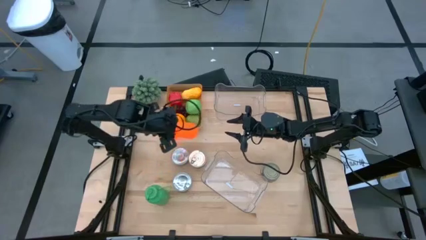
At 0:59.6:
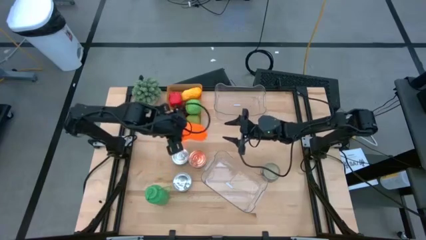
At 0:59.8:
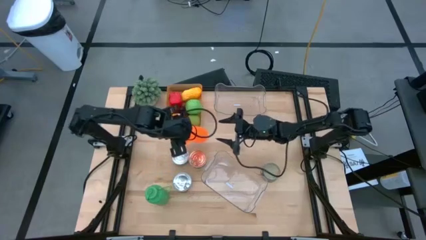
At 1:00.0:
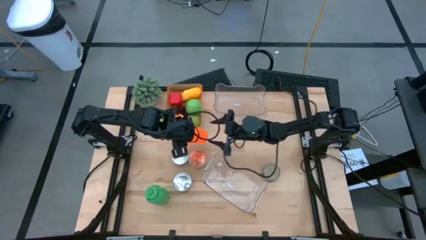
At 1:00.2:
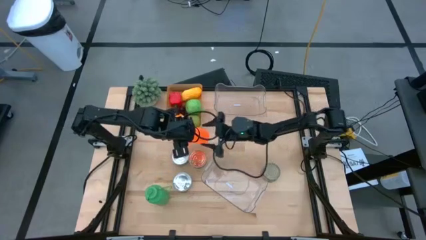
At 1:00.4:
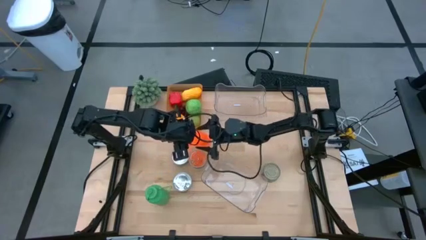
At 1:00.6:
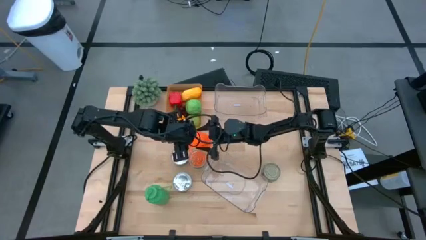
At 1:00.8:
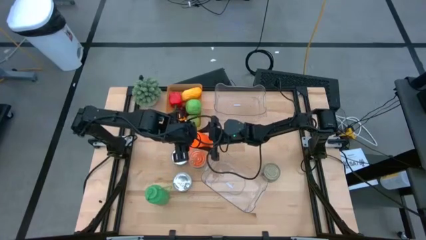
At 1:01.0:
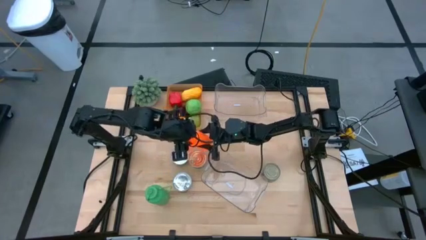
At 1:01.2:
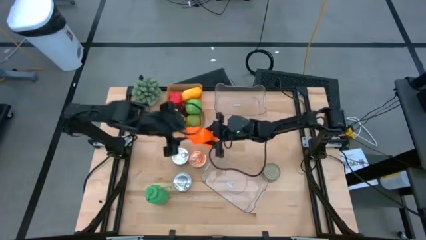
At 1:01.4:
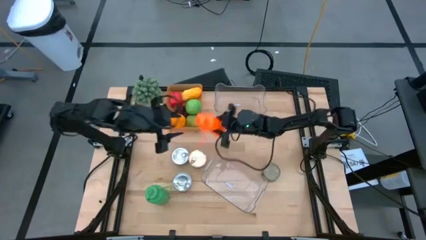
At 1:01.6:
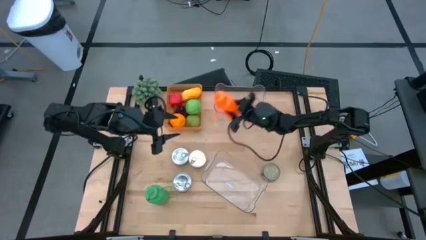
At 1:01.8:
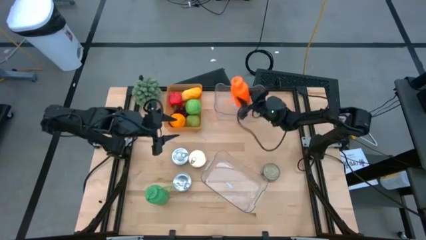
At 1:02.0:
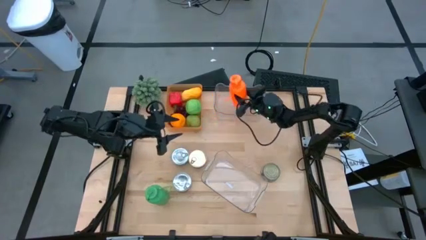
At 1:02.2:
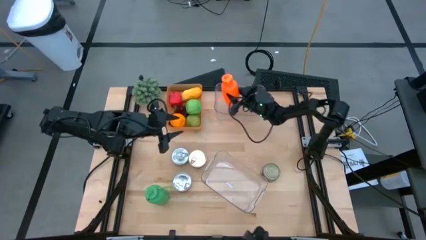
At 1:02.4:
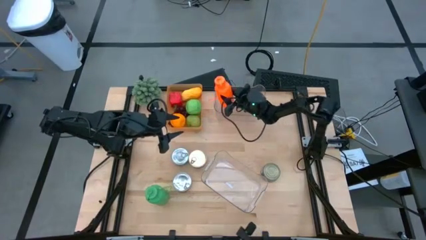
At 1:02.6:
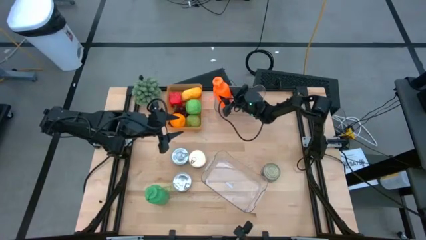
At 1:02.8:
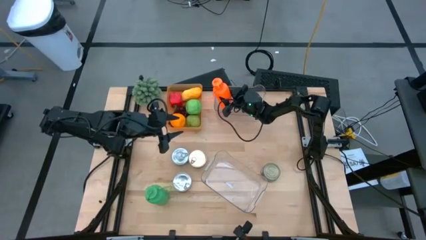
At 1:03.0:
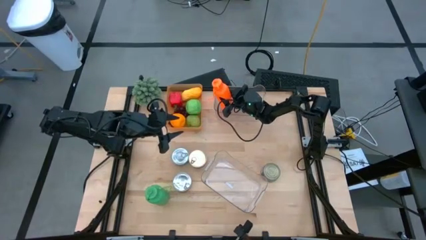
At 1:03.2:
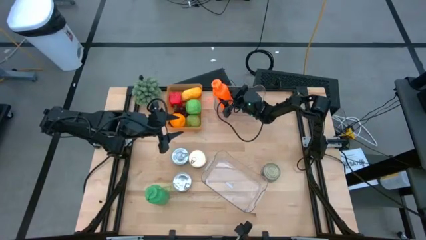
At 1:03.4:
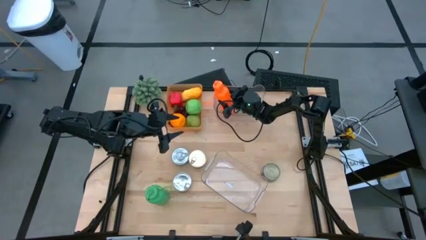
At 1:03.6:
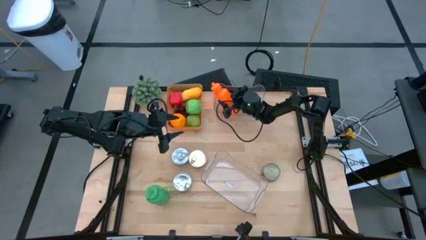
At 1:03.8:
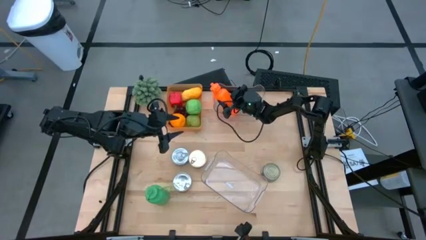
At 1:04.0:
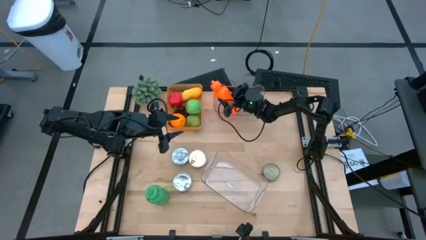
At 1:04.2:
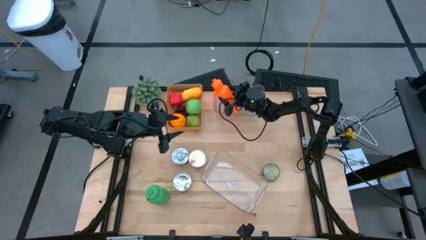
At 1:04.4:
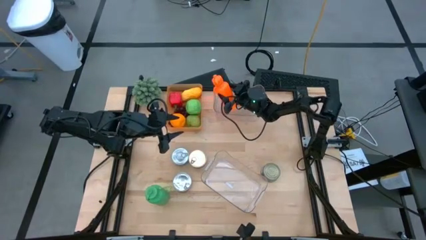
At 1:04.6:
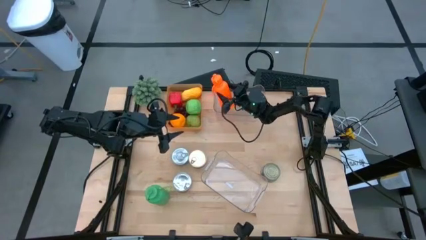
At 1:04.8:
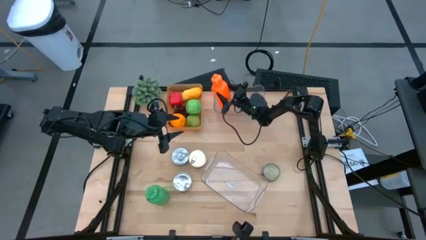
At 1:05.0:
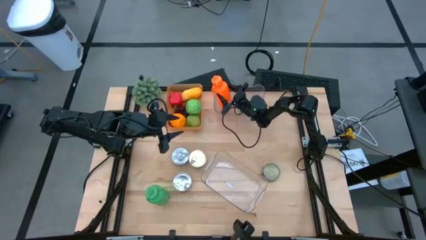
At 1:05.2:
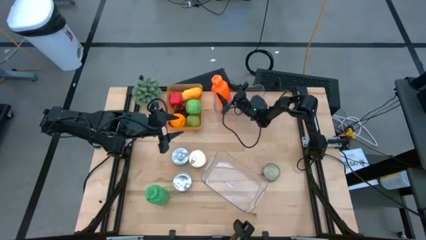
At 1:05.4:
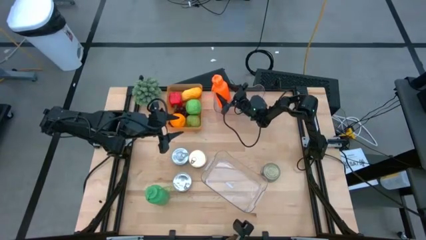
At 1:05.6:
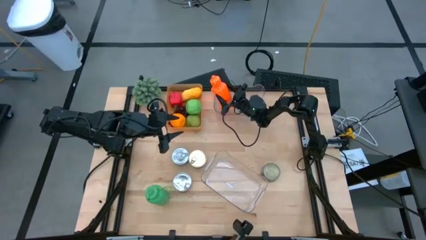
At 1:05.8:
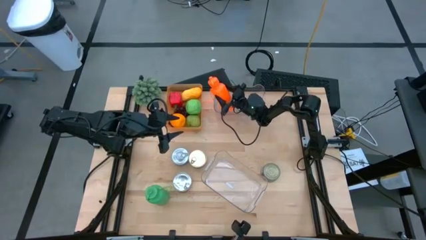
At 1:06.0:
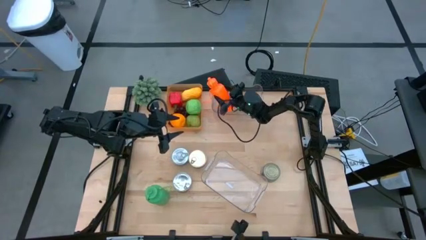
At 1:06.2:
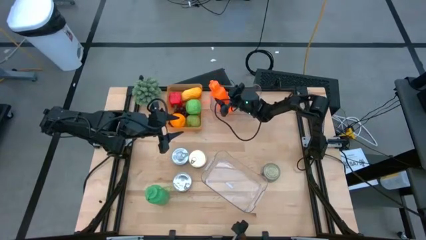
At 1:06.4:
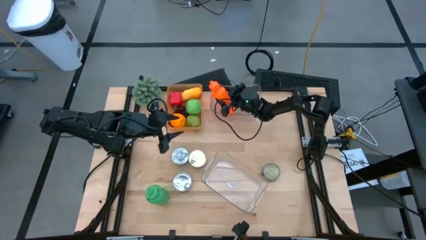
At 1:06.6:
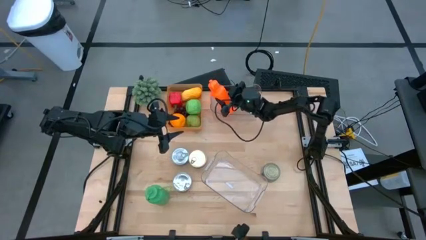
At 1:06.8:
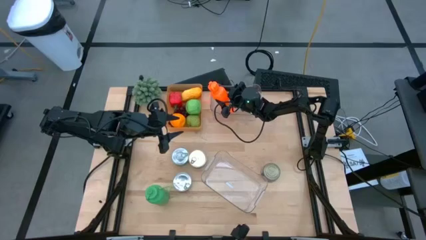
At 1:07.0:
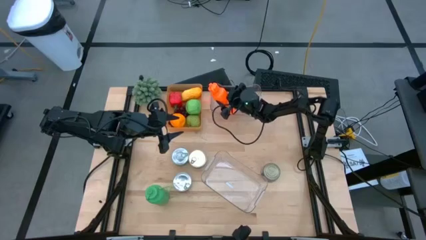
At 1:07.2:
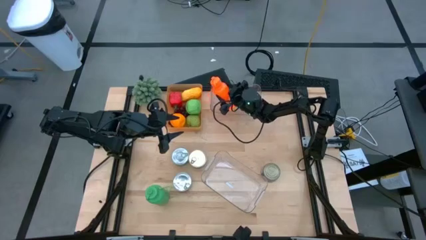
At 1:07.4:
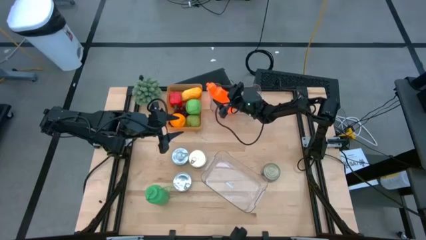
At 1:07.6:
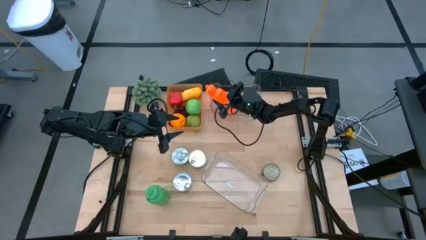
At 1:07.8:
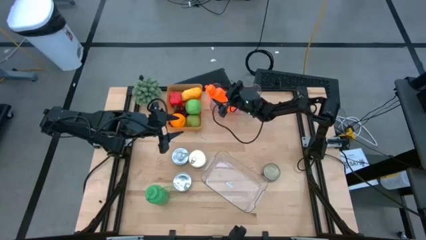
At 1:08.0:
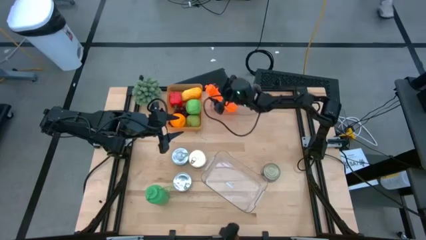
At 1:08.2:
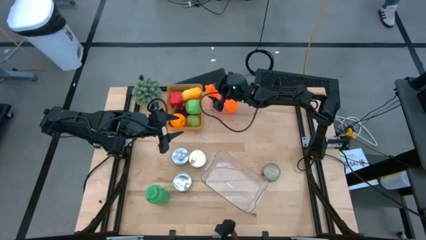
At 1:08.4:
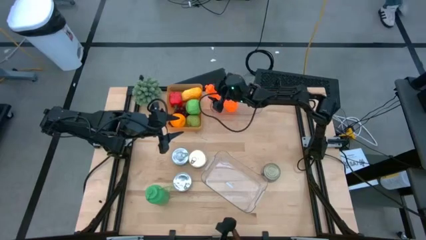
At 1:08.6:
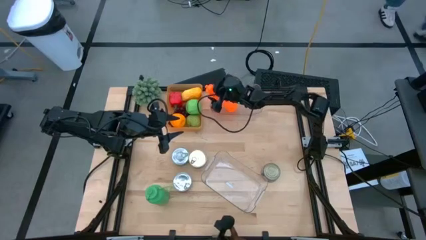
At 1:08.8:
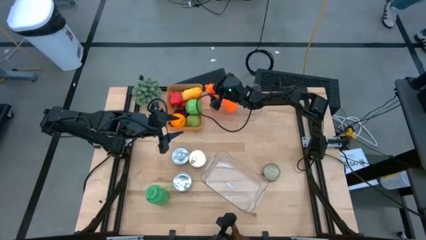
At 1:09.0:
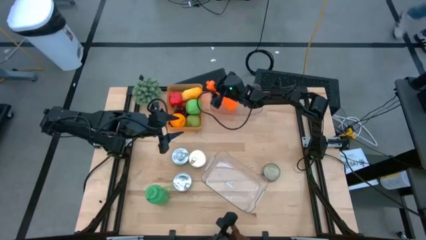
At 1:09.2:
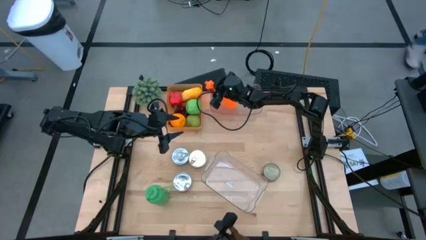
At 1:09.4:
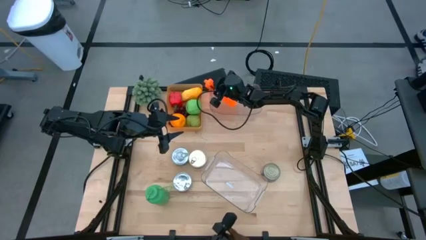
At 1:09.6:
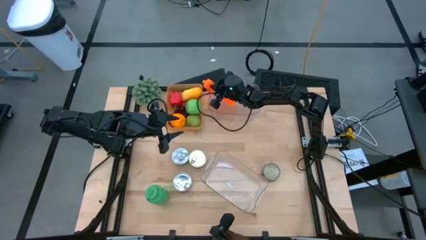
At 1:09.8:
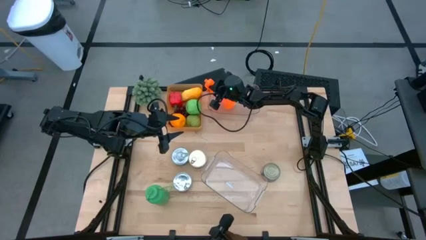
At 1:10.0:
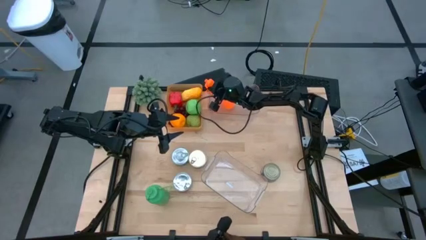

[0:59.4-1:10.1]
Task: Pick & Place Food Item
Put the orange water bottle into the top transparent bin

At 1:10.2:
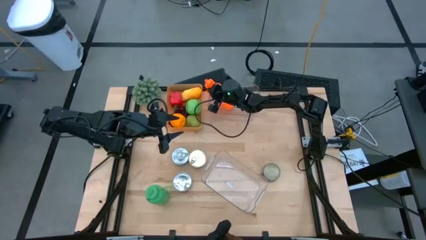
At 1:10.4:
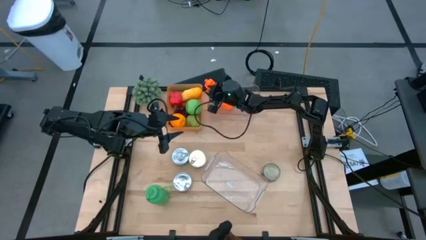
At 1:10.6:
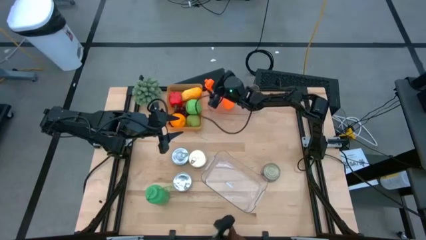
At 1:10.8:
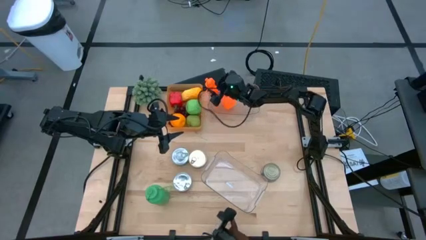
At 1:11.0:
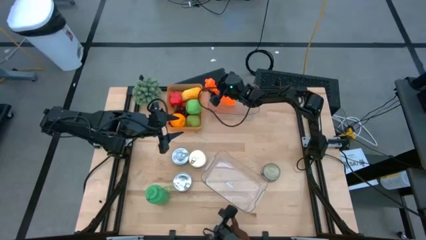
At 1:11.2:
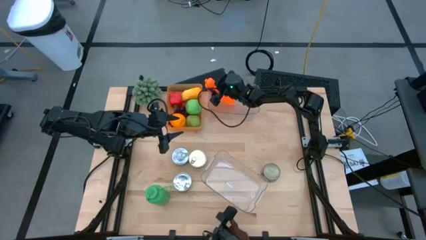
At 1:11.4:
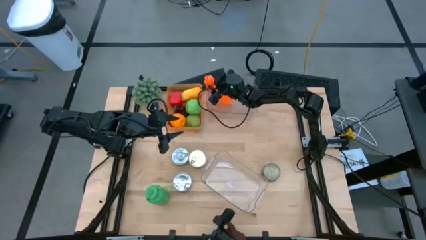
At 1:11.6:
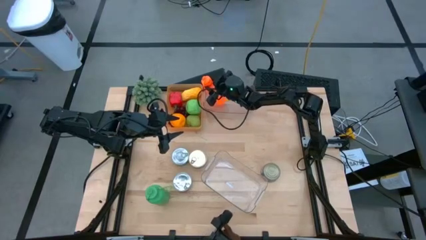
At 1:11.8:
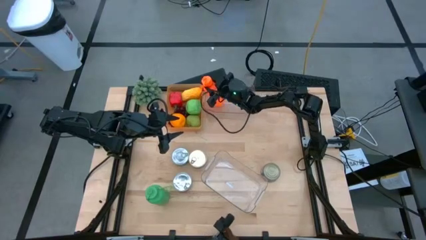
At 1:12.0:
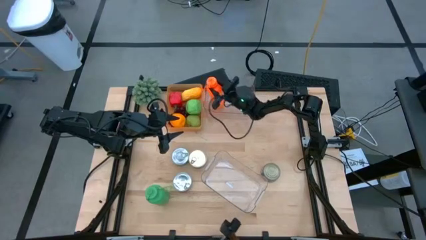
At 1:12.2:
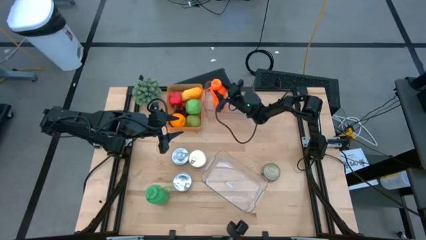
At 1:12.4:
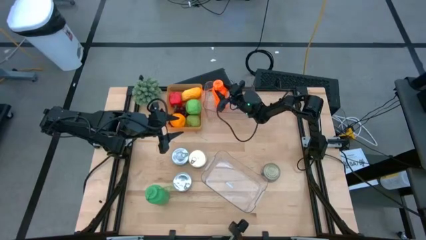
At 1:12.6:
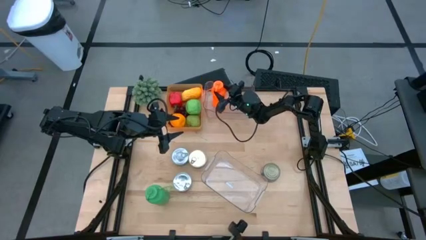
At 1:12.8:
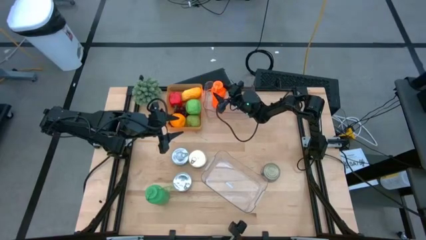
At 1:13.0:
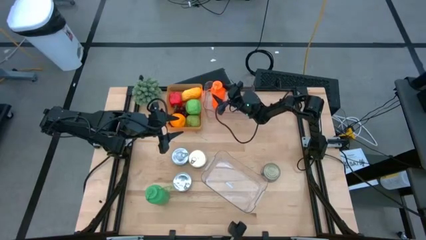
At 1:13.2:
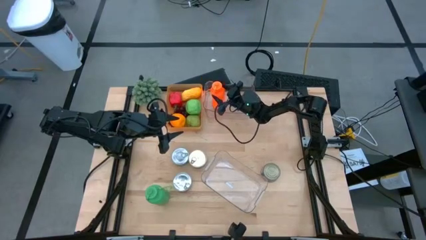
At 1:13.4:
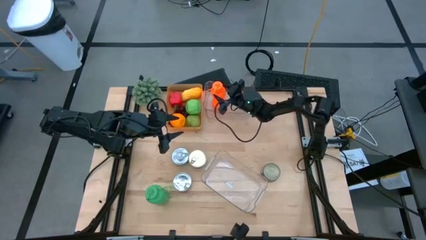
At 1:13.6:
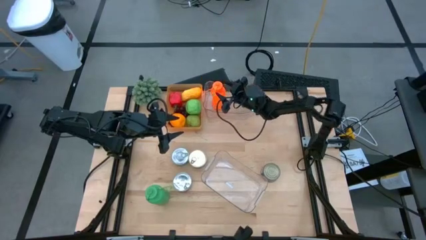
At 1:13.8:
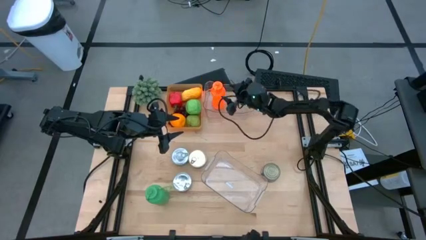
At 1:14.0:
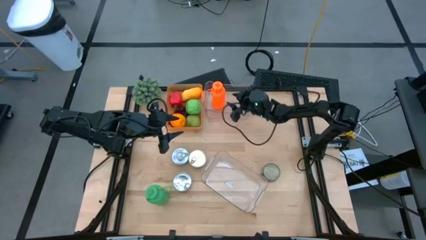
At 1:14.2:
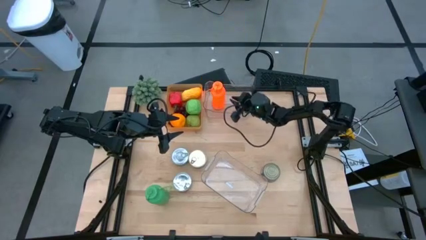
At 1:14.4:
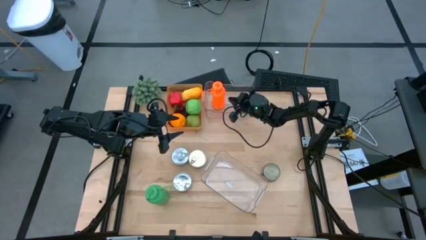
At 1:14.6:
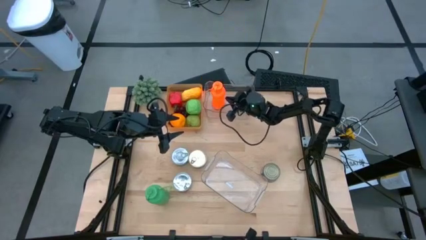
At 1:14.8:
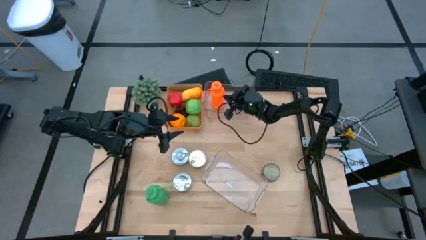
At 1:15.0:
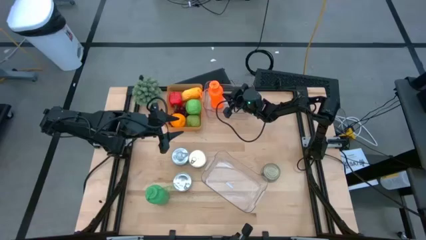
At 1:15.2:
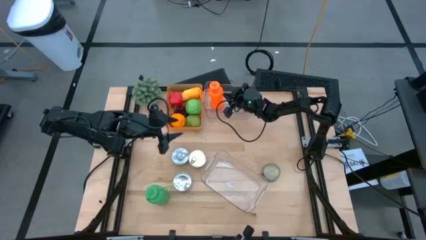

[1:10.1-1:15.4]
Put the orange water bottle into the top transparent bin
